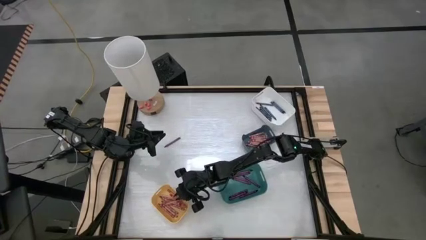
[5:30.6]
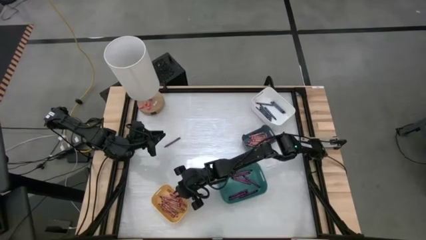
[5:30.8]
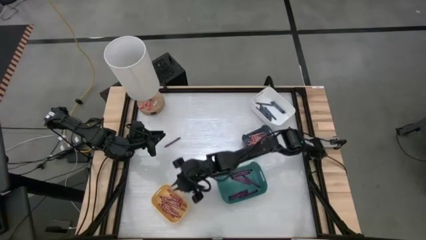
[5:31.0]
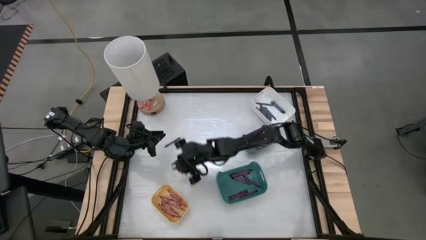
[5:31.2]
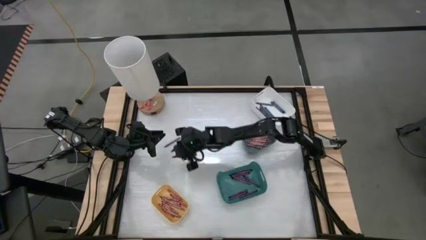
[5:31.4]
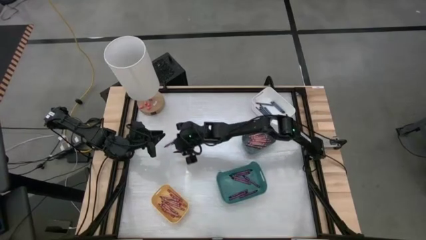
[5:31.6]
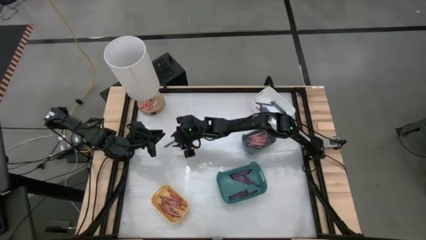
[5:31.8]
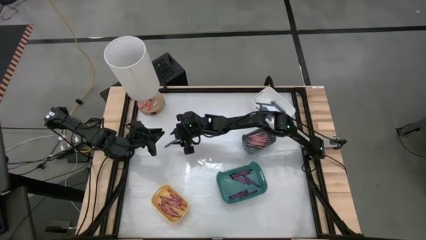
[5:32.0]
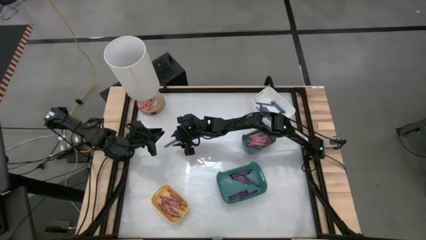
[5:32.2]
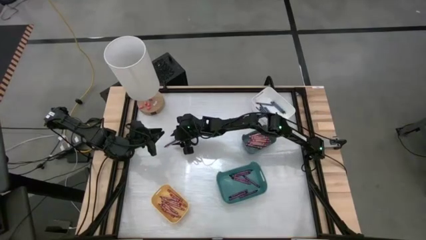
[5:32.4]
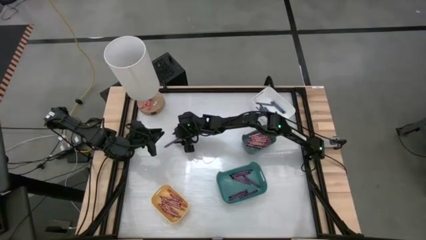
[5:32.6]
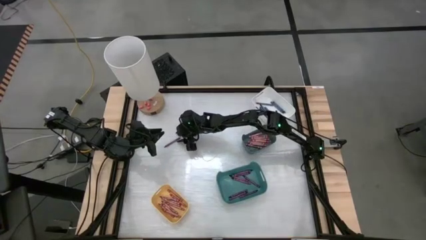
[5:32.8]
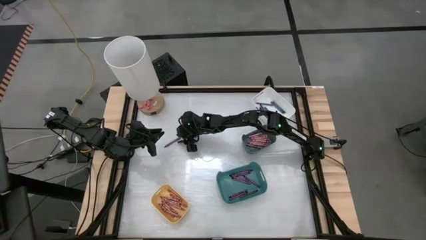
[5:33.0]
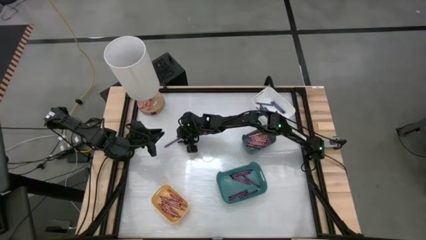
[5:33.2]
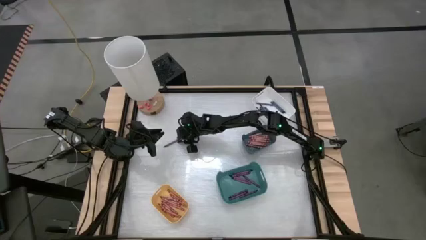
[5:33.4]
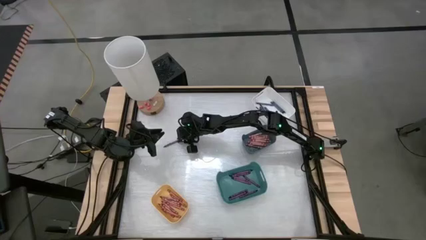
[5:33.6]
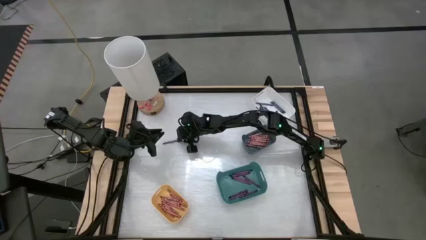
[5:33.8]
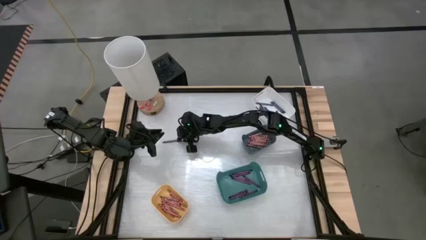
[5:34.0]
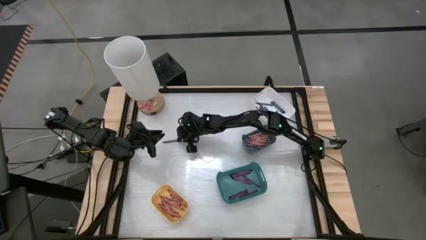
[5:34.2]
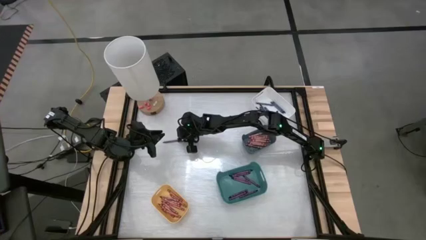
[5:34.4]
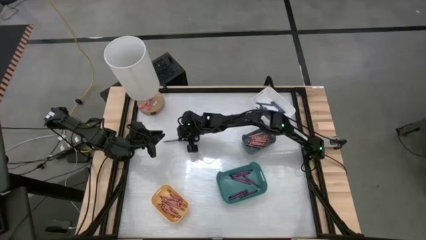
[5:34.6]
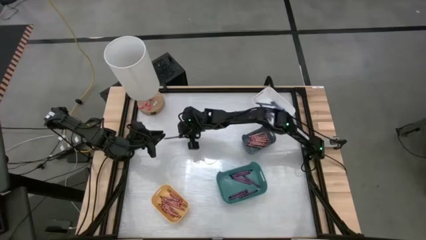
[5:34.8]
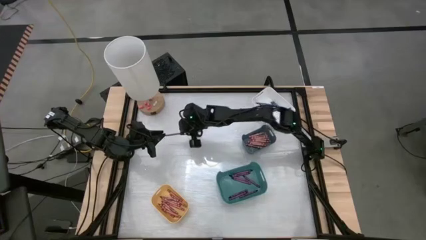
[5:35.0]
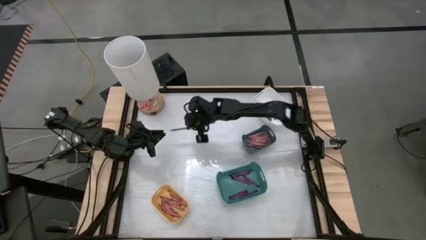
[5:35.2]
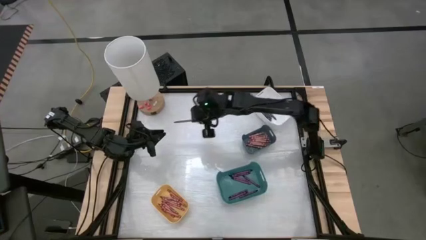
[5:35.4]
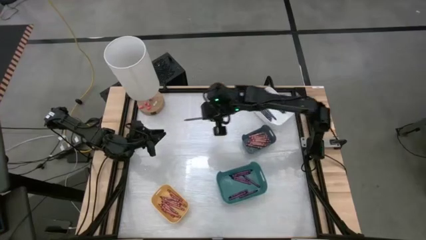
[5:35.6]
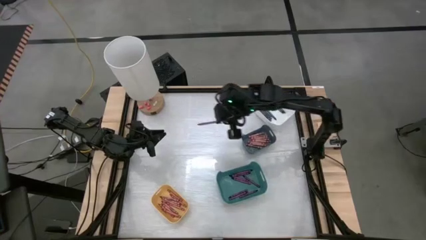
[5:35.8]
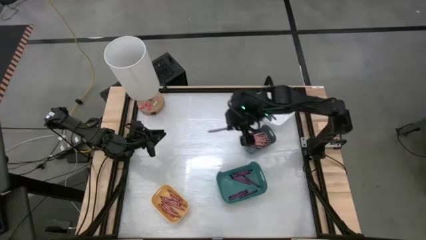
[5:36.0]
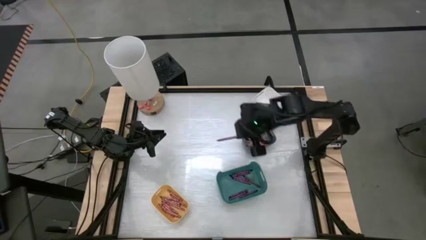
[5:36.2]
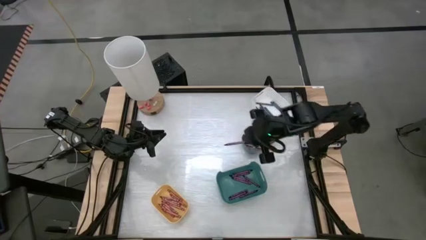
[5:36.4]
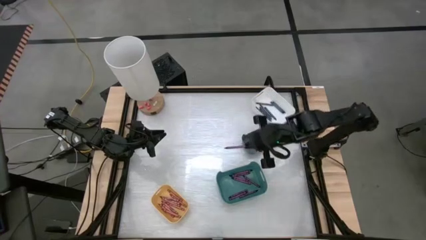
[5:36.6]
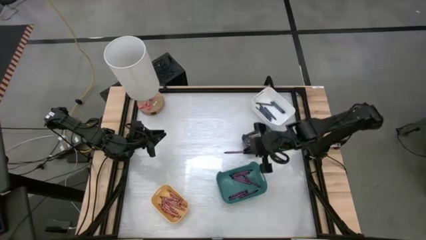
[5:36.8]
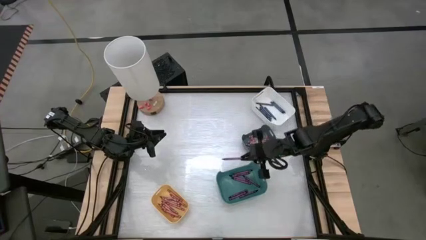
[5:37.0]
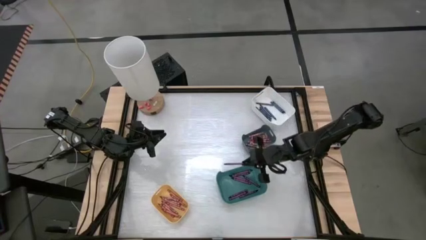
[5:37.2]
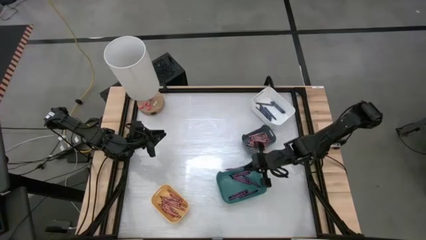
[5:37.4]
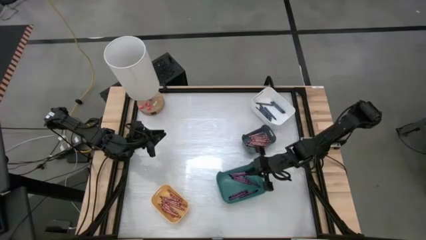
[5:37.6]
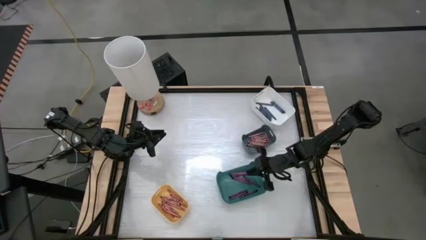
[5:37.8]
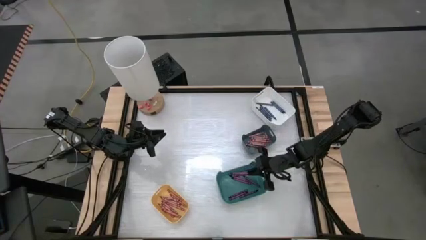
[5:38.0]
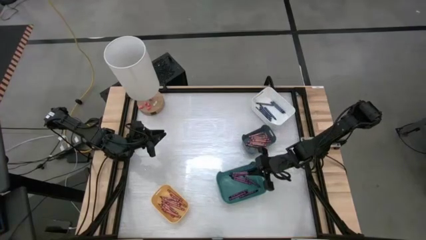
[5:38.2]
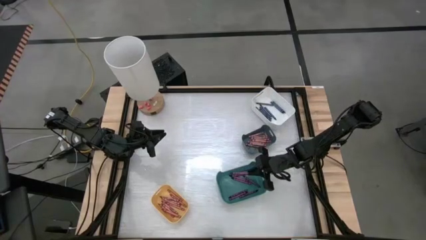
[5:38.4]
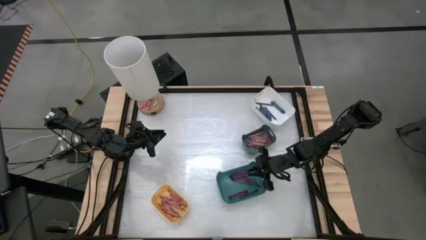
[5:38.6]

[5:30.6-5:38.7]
Task: Sort crayons
Put the purple crayon into the blue bin

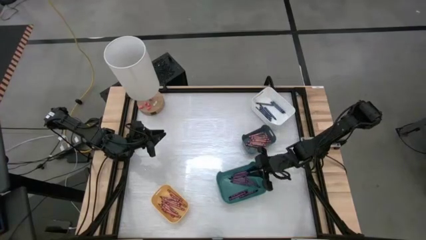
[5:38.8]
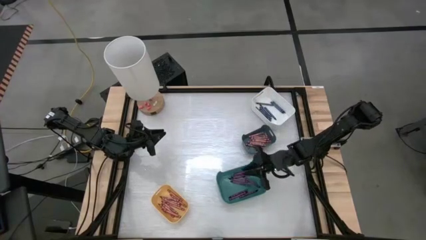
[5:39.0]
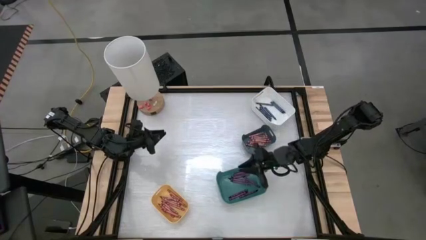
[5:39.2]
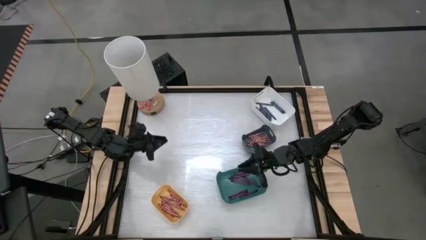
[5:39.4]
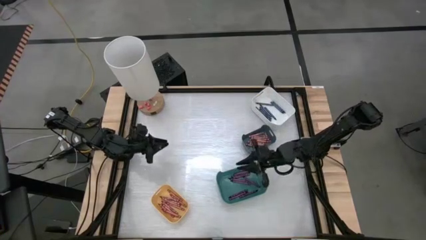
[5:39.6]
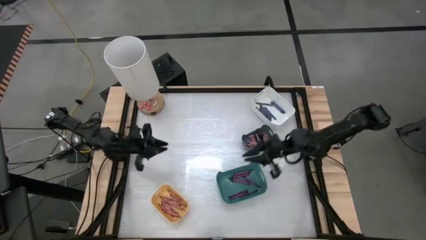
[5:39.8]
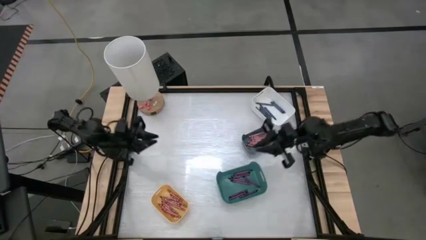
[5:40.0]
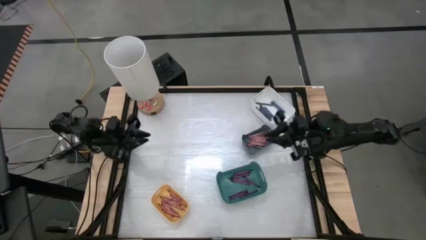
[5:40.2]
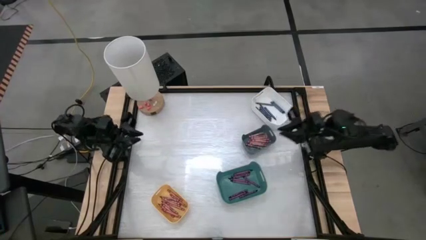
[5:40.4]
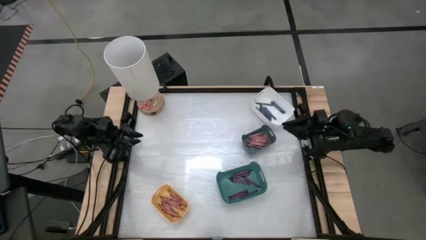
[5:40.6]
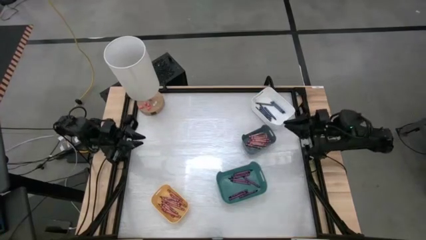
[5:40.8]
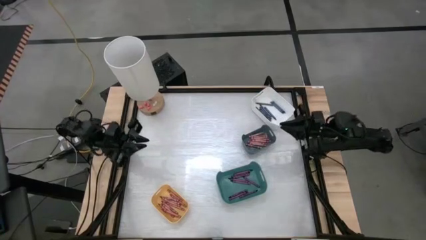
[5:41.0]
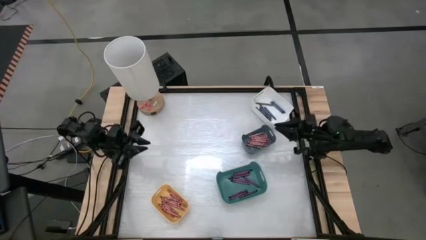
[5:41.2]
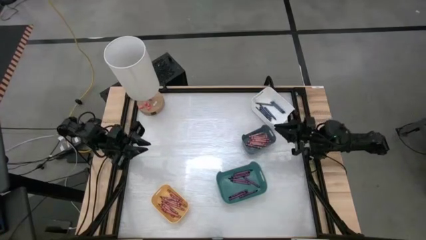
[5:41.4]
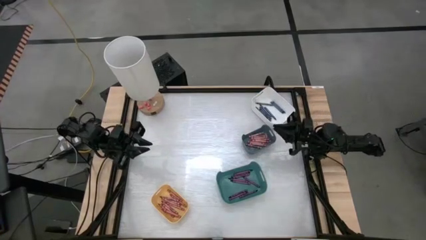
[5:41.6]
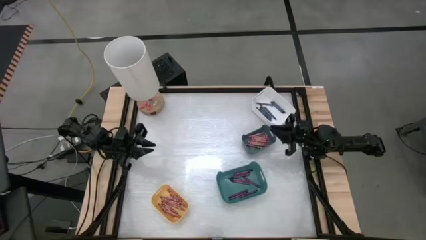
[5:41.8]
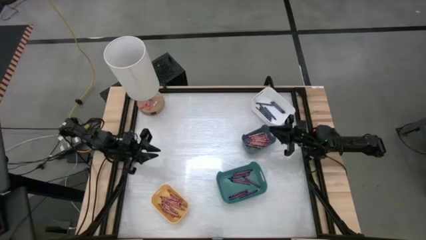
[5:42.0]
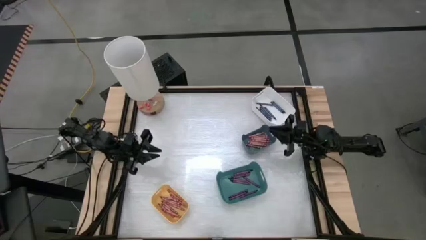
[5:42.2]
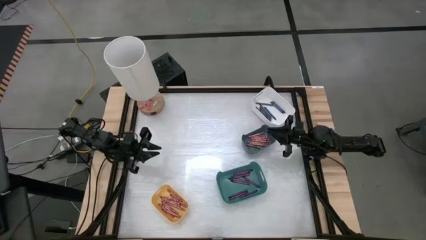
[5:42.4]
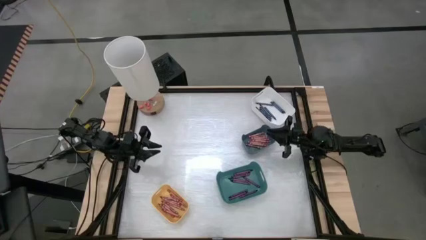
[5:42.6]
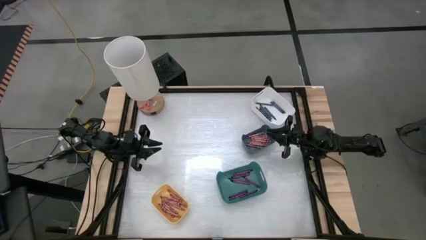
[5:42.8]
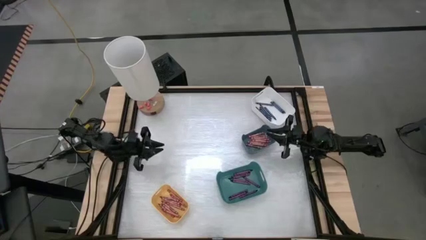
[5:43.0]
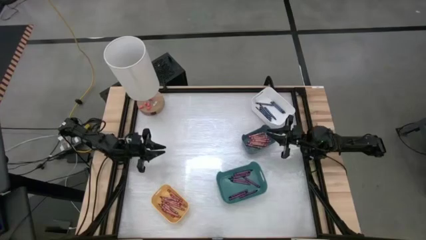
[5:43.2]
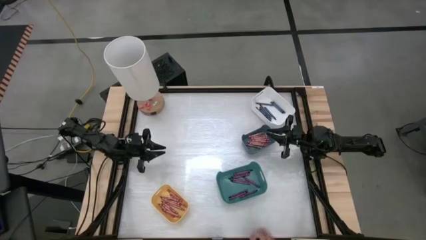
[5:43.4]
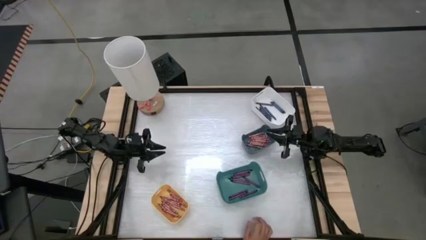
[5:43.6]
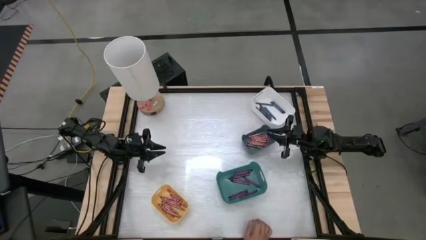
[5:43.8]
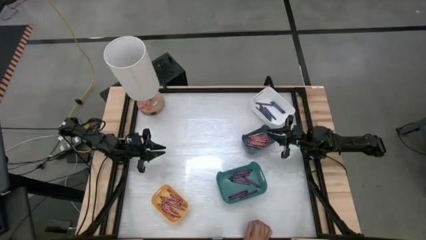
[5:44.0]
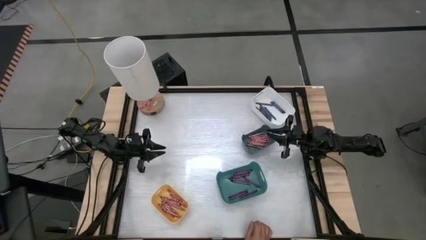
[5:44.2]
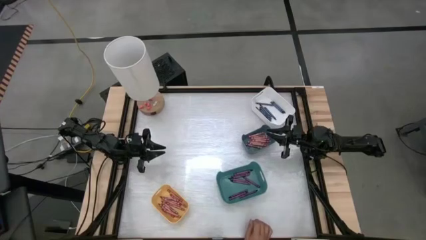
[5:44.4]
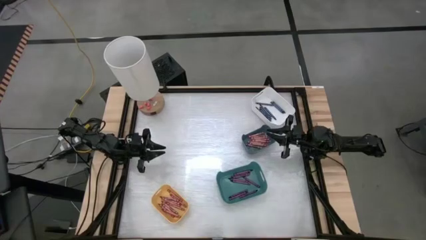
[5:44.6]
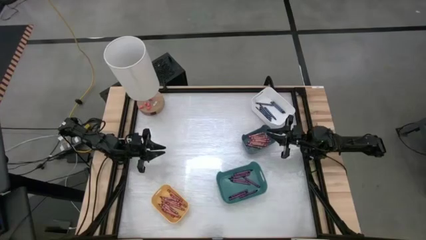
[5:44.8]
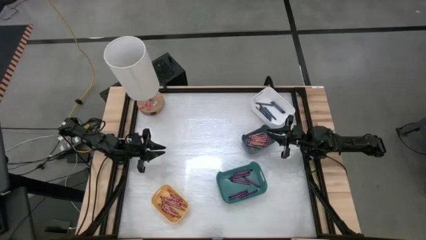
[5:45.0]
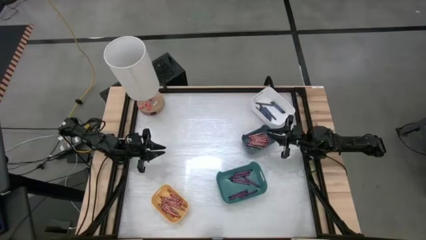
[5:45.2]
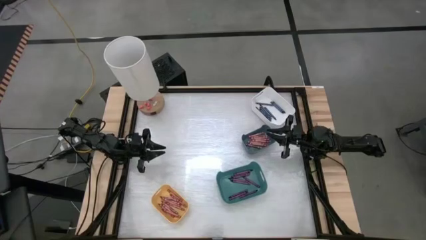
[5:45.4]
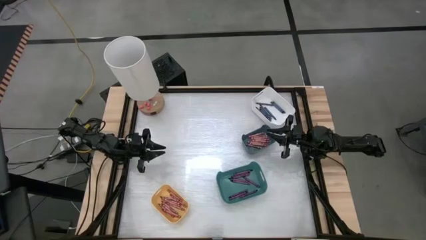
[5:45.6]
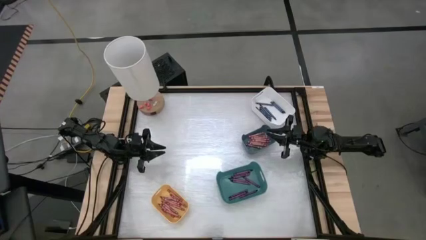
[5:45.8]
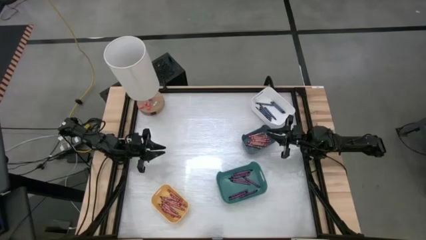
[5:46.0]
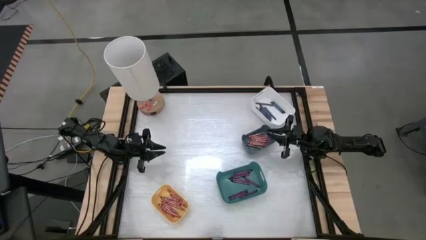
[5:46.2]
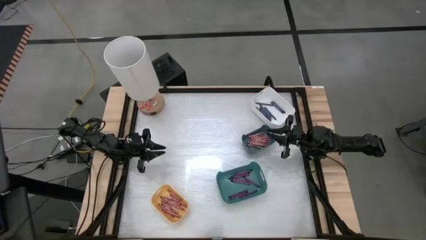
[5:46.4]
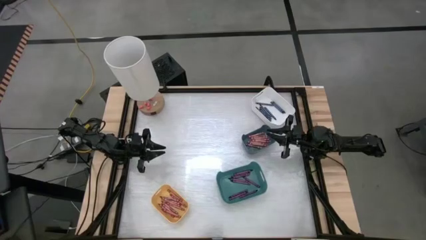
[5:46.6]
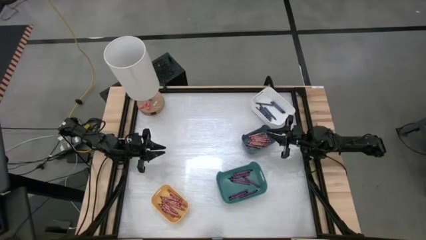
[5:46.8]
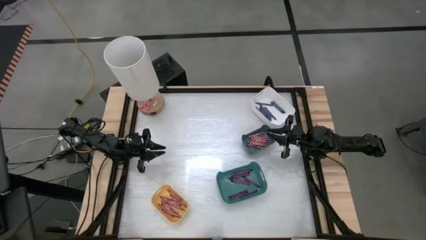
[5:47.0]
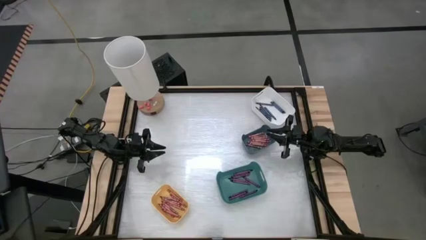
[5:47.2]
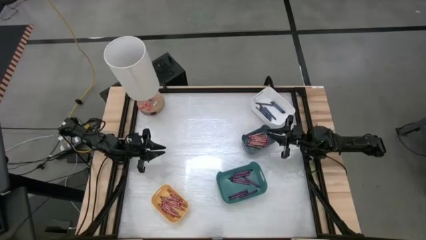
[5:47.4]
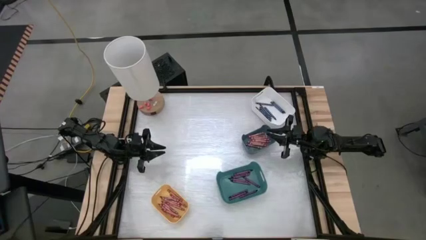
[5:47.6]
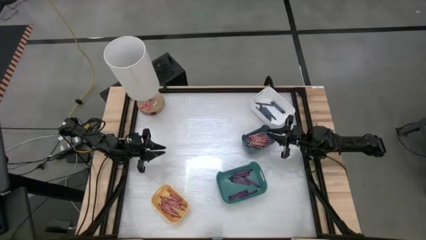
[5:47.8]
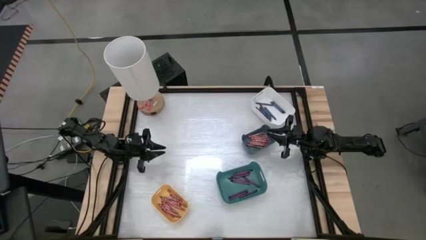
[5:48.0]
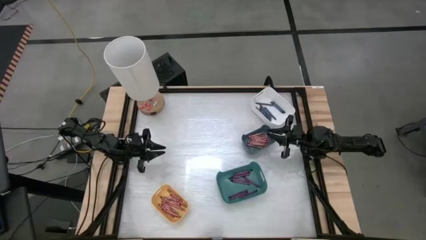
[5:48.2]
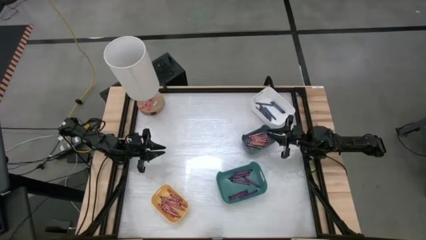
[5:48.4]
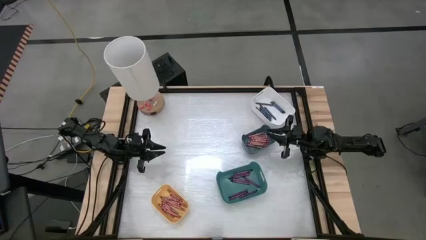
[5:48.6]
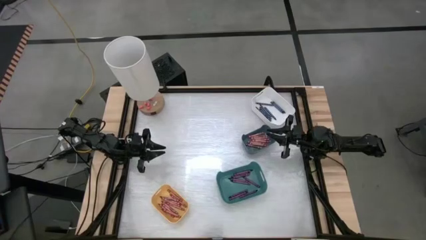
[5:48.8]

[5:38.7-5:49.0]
Return to Home Position
